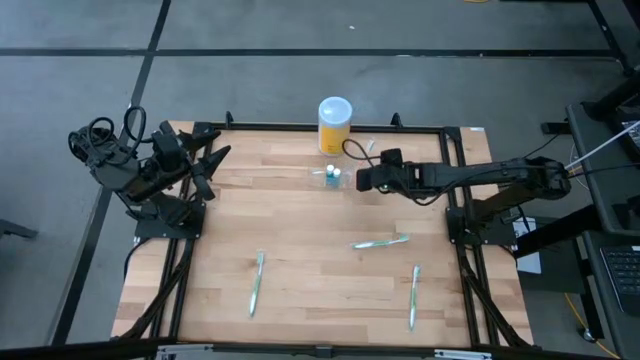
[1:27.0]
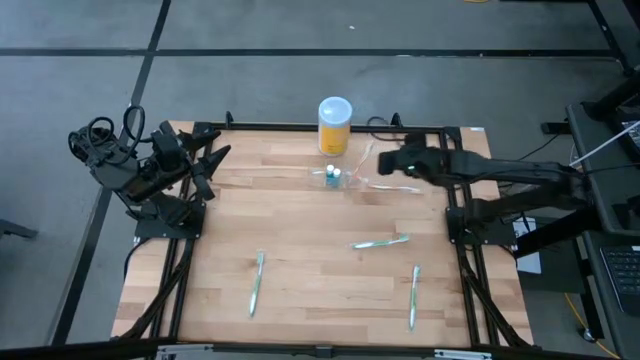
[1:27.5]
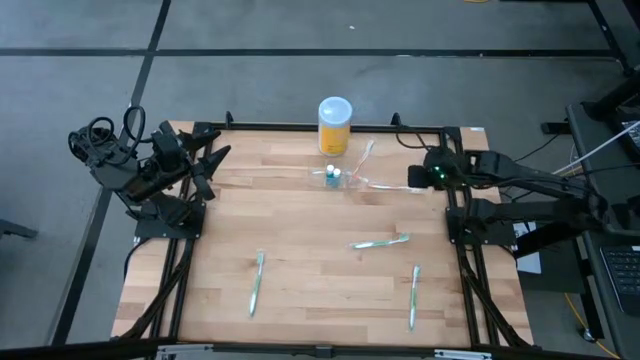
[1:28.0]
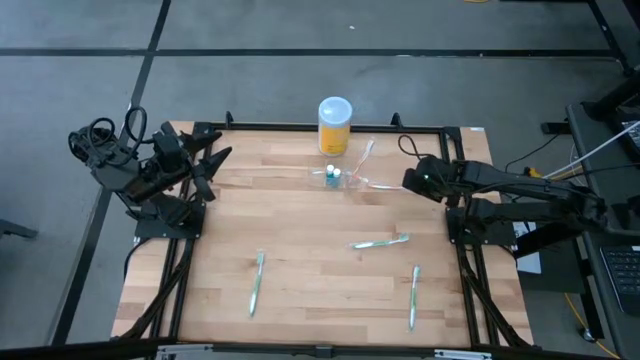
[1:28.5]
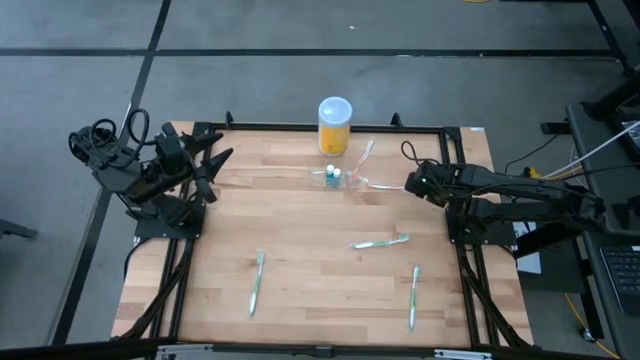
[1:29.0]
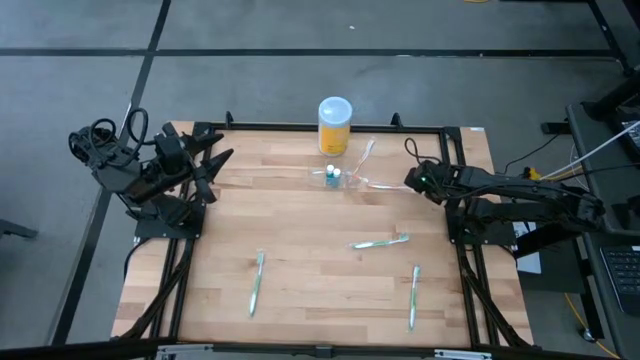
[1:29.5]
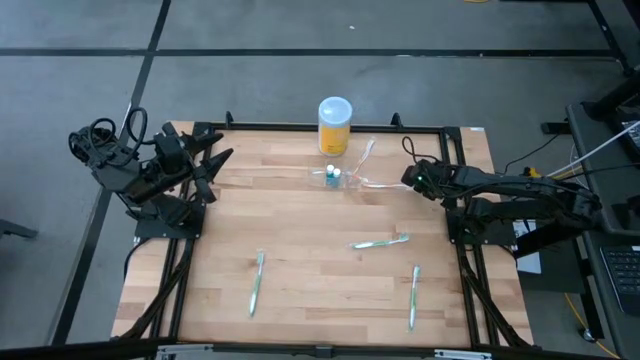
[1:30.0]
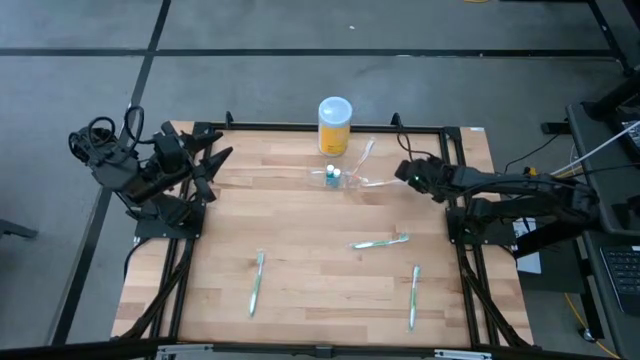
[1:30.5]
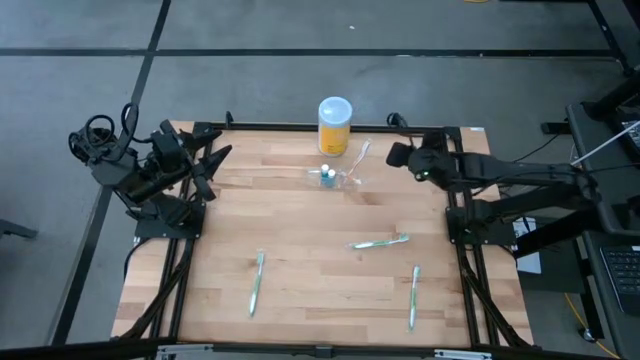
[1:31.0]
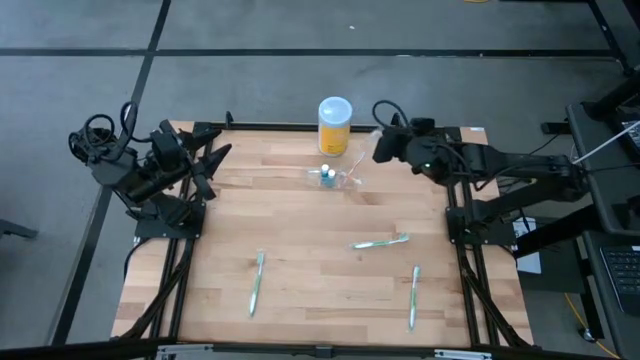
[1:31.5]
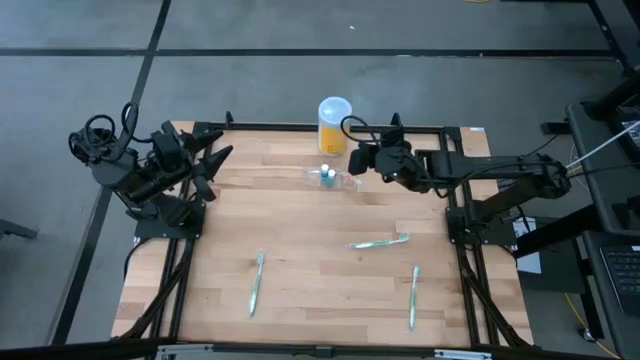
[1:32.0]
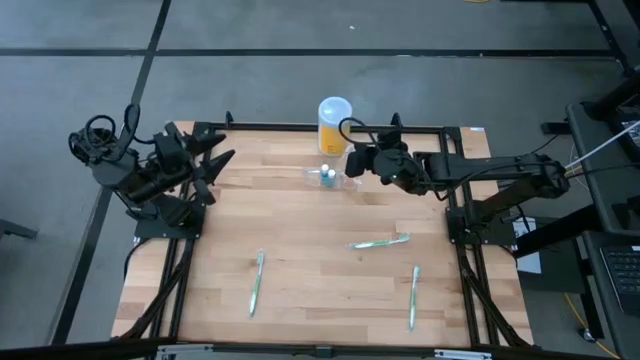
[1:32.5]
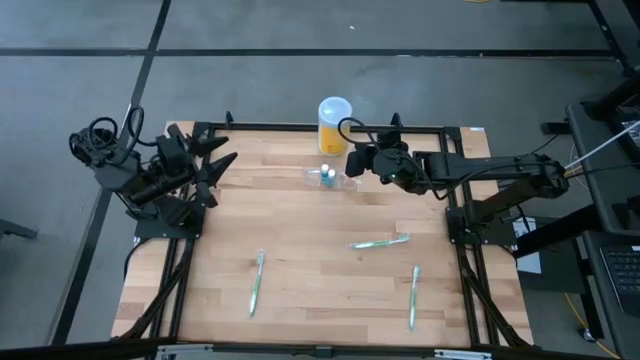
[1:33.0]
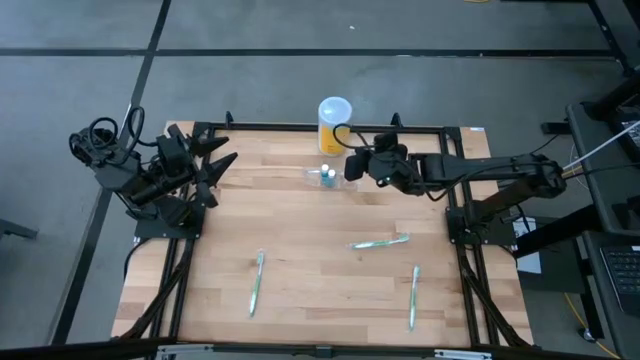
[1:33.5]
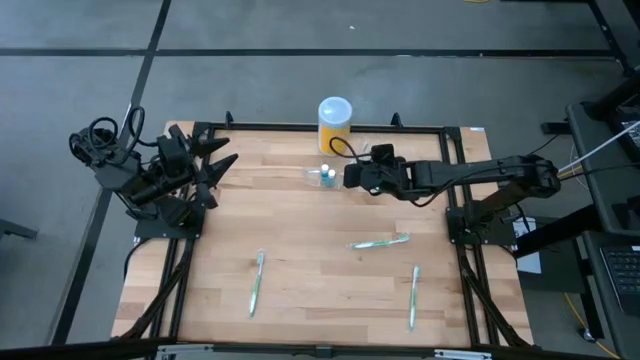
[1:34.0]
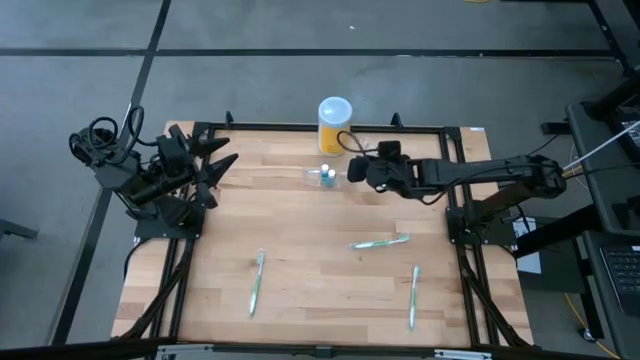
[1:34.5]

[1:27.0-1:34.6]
Task: Pick & Place toothbrushing station
Put the orange toothbrush into the transparent organizer

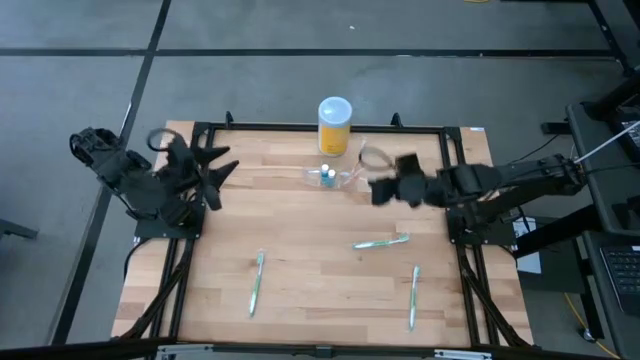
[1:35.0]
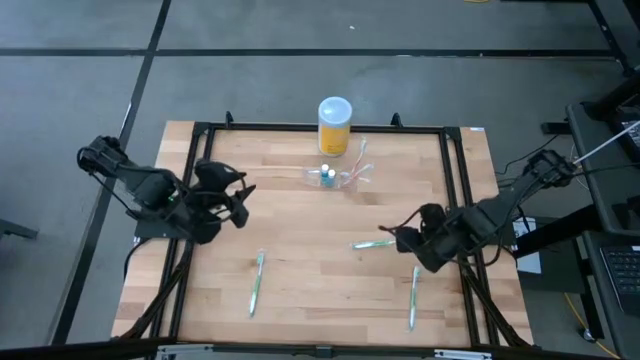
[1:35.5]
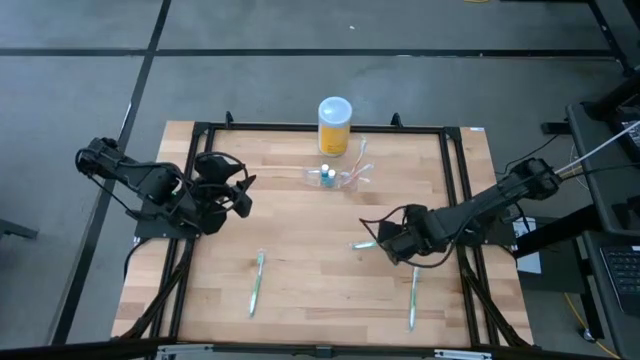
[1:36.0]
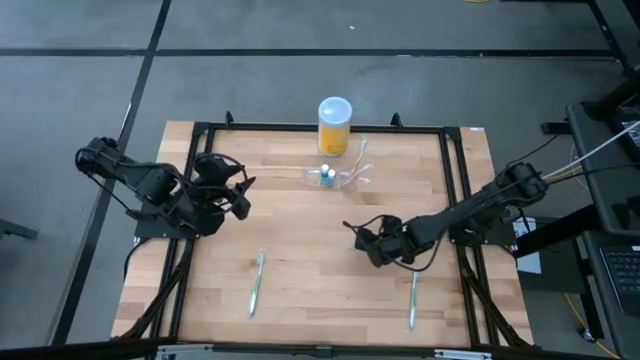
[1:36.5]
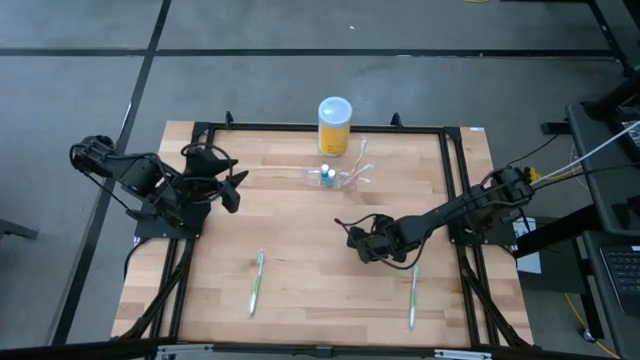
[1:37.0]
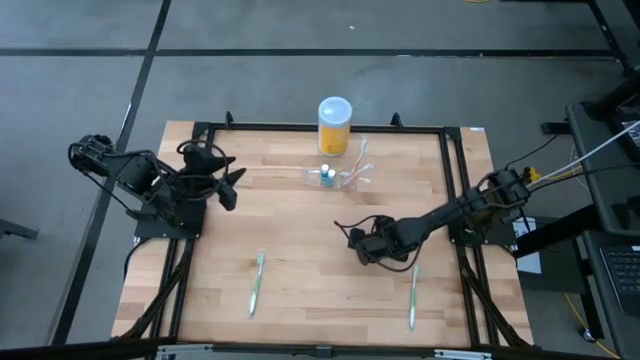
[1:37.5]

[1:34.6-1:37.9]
Put the middle green toothbrush into the transparent organizer

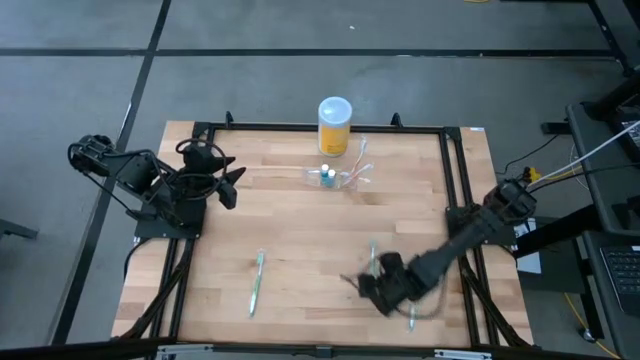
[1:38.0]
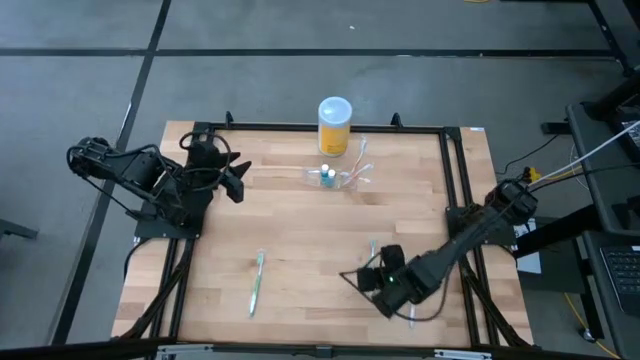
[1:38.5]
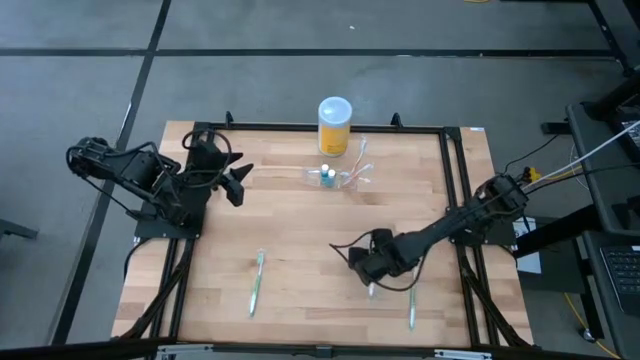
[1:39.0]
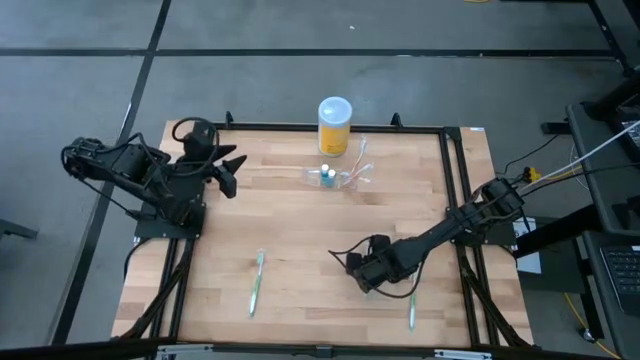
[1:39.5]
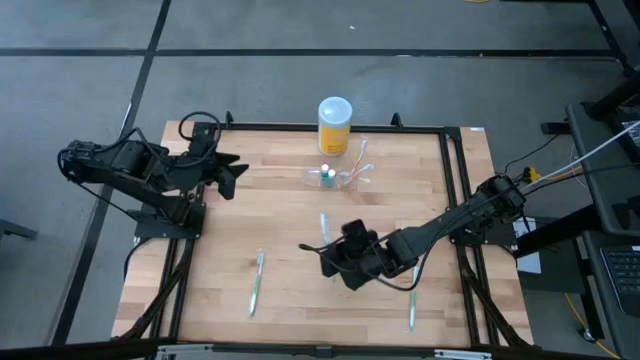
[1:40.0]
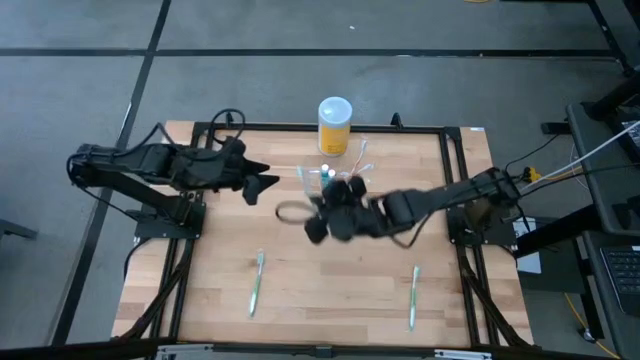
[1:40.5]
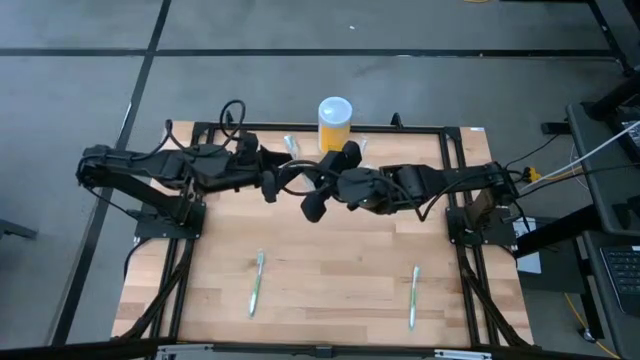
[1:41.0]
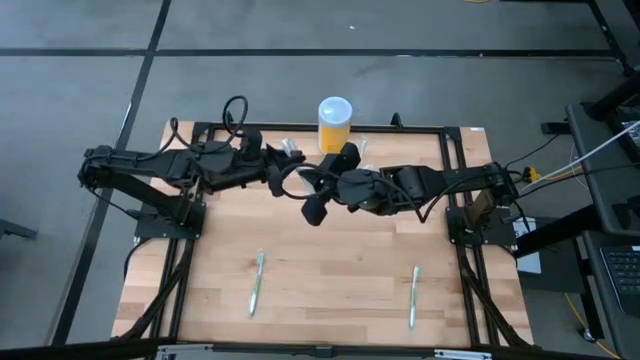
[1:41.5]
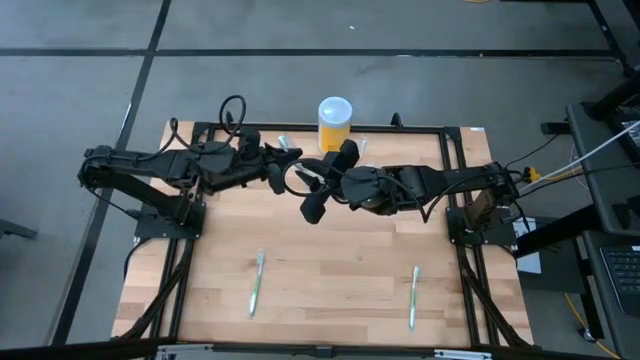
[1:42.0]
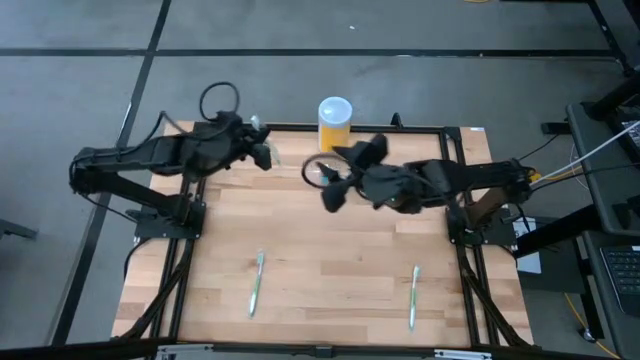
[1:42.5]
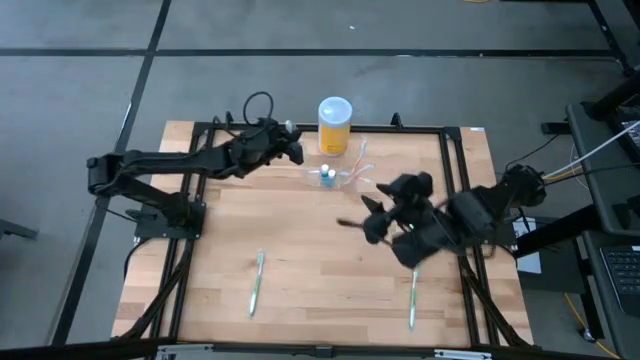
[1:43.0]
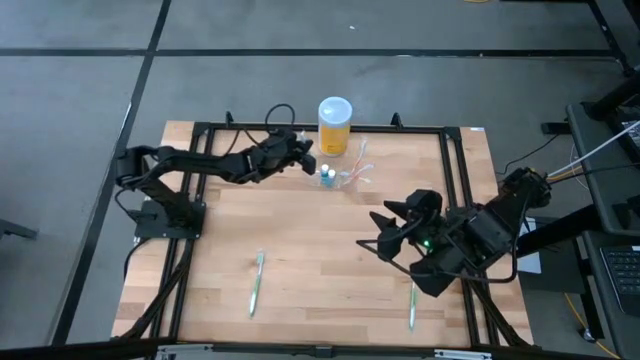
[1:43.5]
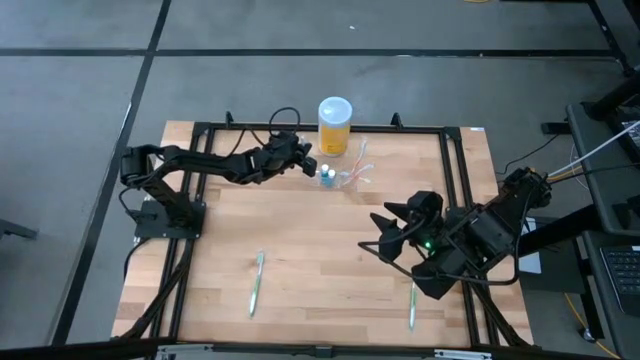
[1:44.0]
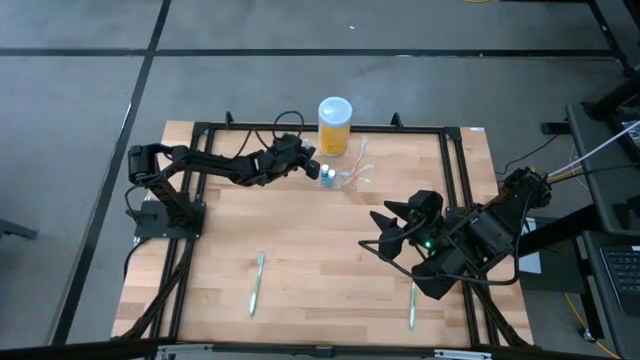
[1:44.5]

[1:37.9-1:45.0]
Put the middle green toothbrush into the transparent organizer
